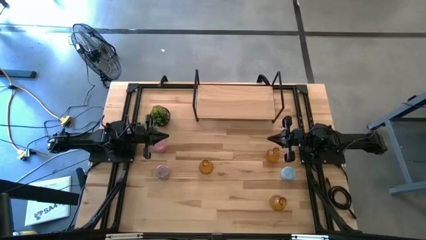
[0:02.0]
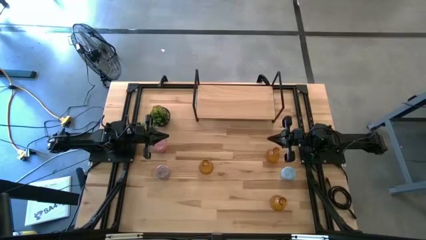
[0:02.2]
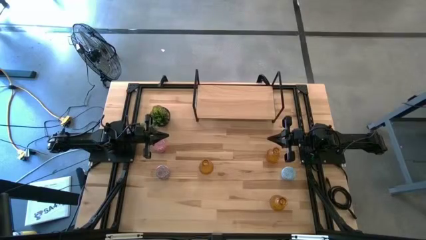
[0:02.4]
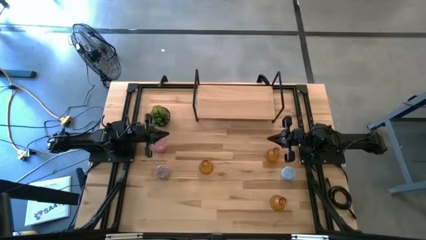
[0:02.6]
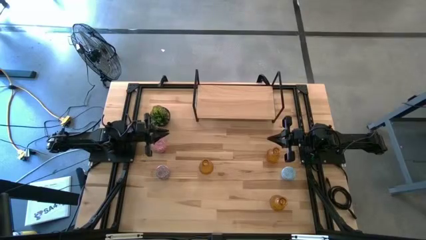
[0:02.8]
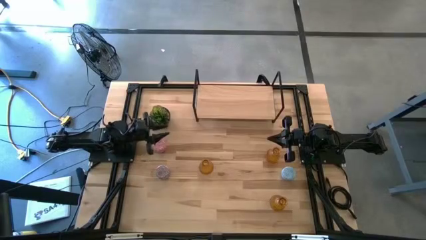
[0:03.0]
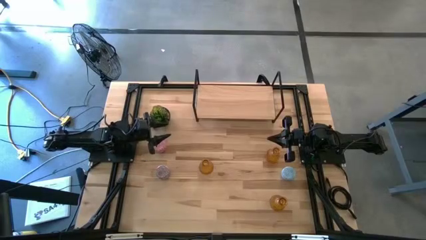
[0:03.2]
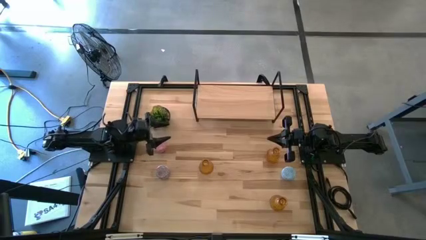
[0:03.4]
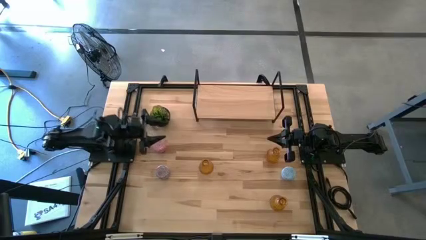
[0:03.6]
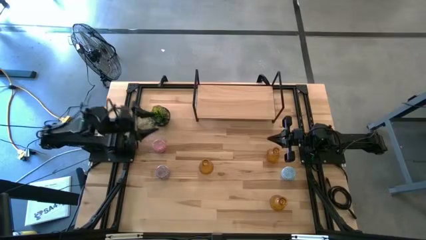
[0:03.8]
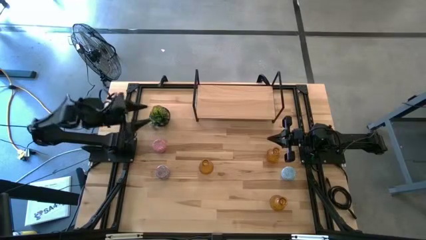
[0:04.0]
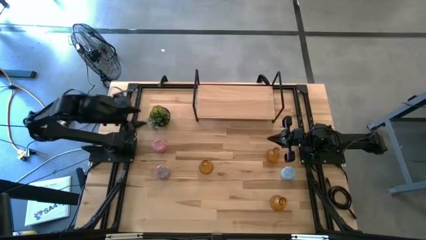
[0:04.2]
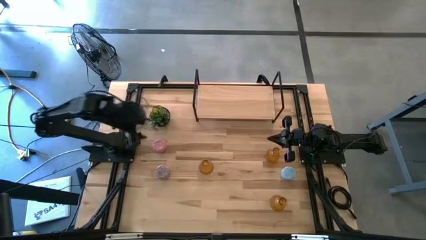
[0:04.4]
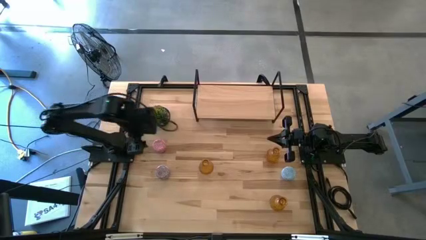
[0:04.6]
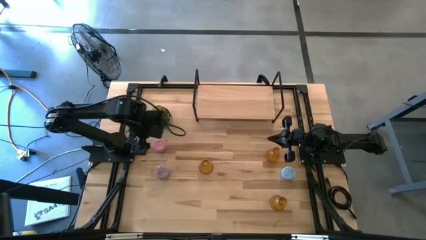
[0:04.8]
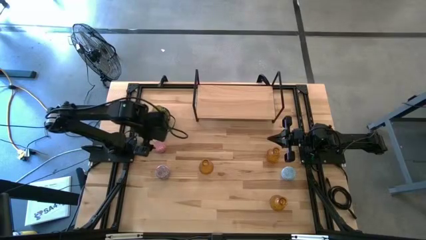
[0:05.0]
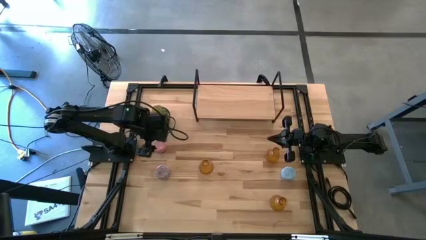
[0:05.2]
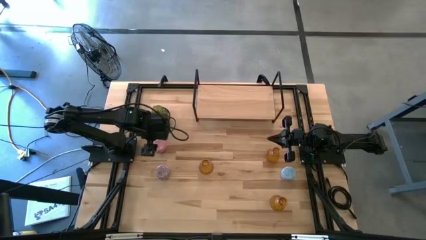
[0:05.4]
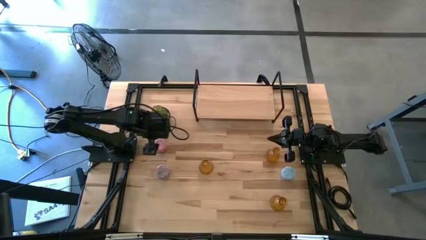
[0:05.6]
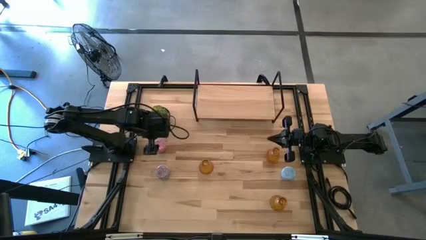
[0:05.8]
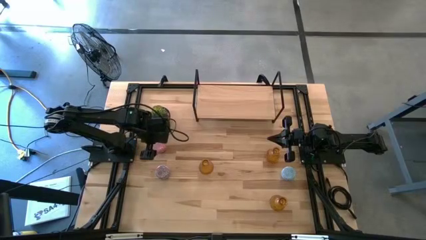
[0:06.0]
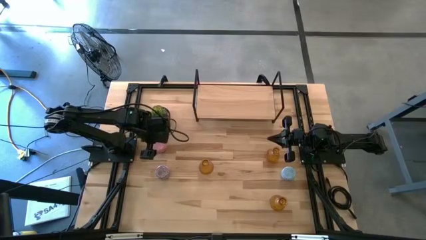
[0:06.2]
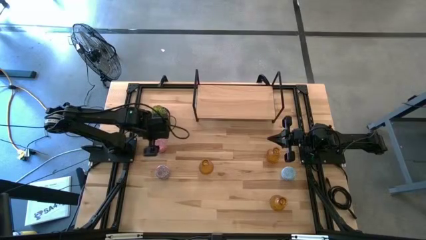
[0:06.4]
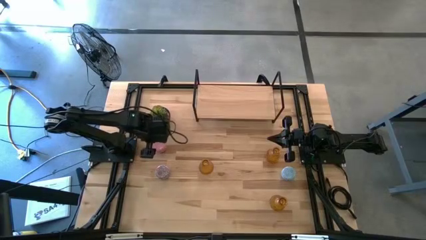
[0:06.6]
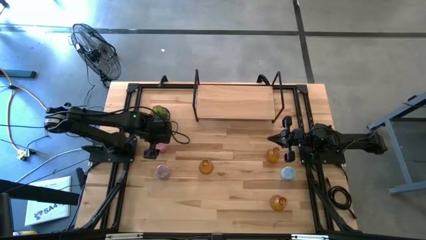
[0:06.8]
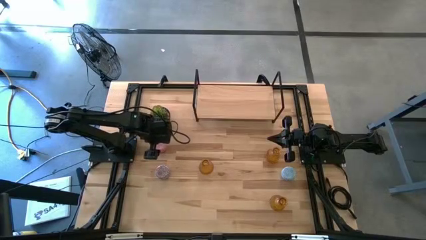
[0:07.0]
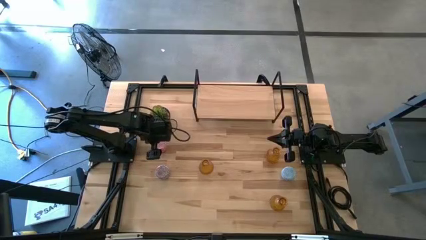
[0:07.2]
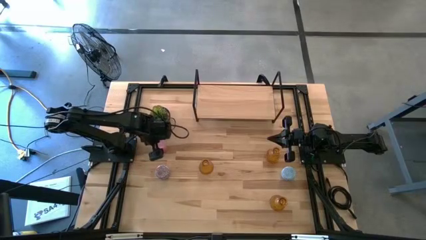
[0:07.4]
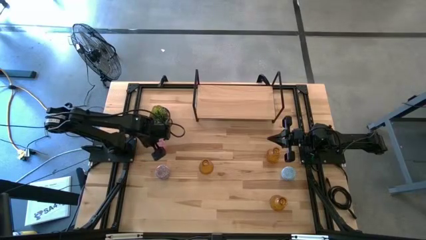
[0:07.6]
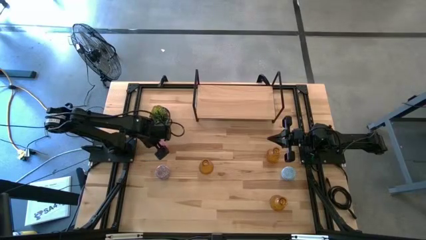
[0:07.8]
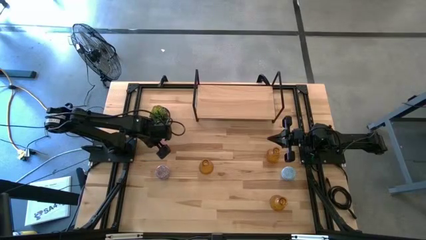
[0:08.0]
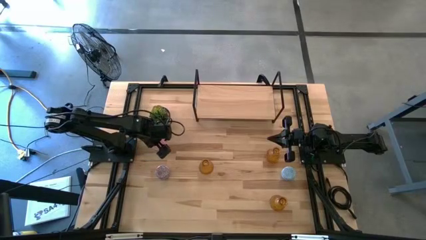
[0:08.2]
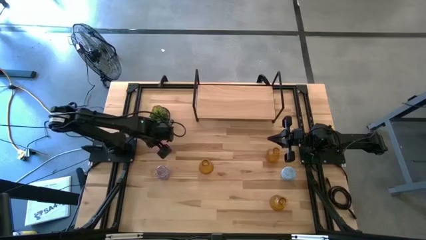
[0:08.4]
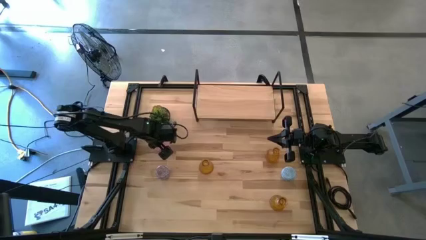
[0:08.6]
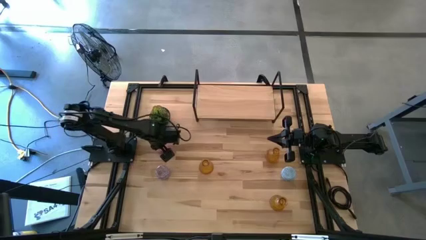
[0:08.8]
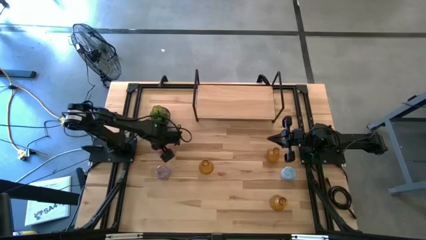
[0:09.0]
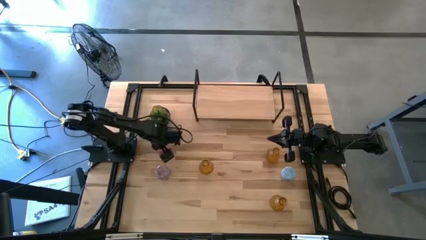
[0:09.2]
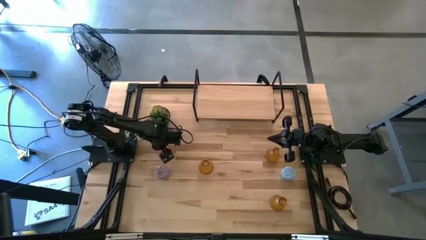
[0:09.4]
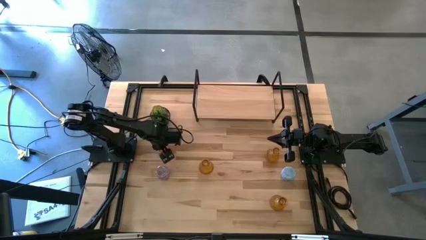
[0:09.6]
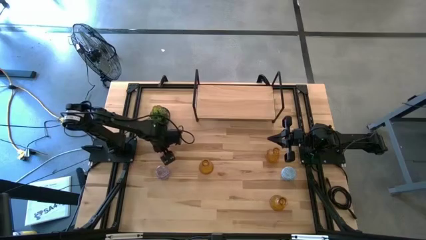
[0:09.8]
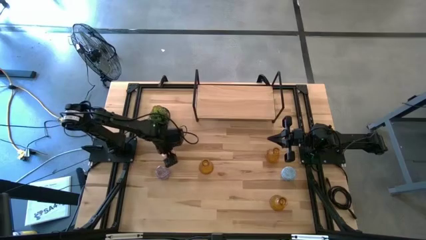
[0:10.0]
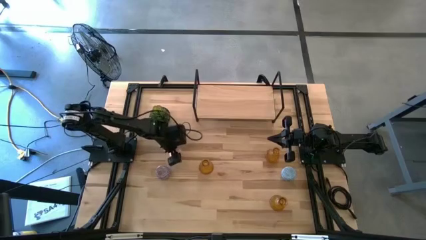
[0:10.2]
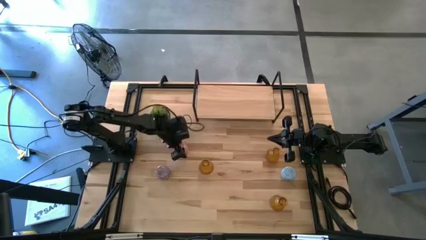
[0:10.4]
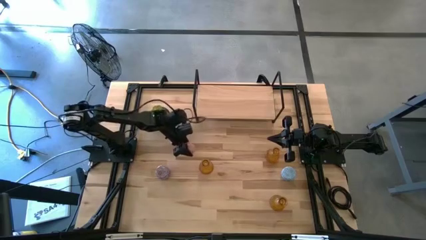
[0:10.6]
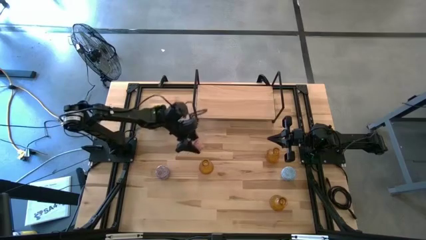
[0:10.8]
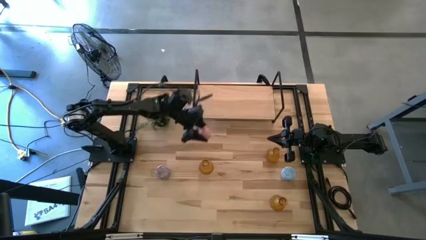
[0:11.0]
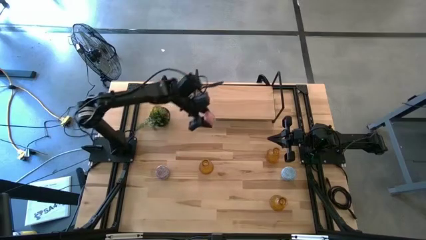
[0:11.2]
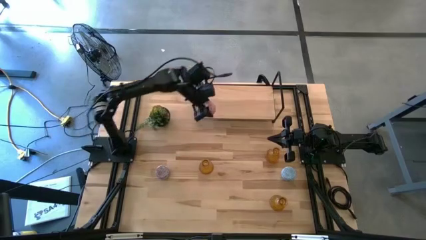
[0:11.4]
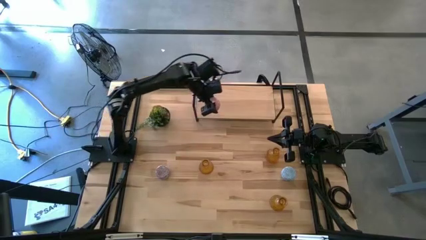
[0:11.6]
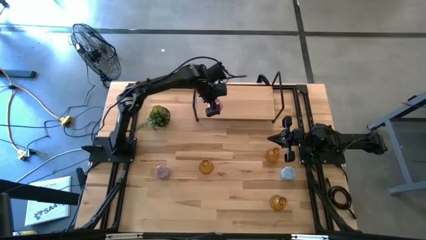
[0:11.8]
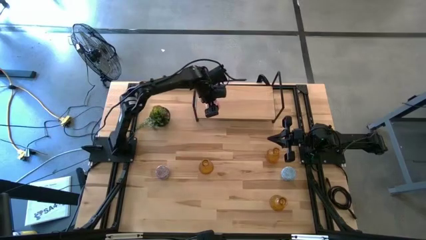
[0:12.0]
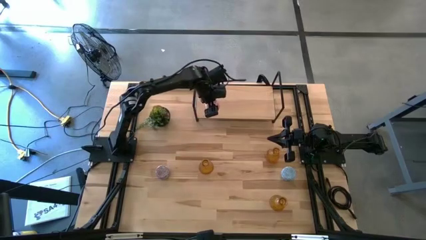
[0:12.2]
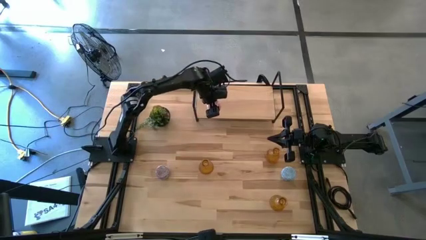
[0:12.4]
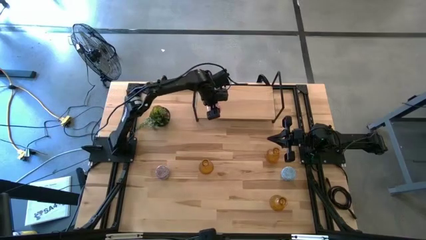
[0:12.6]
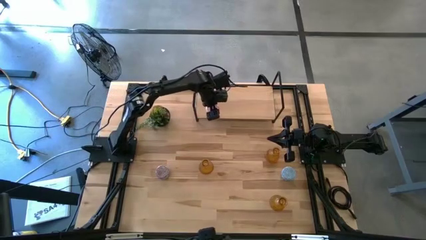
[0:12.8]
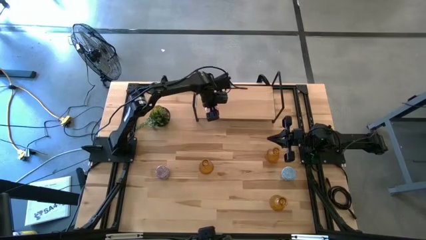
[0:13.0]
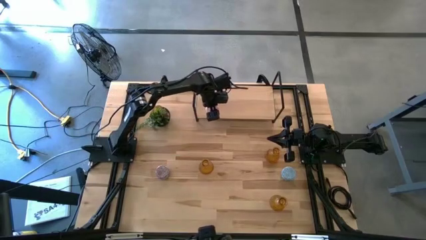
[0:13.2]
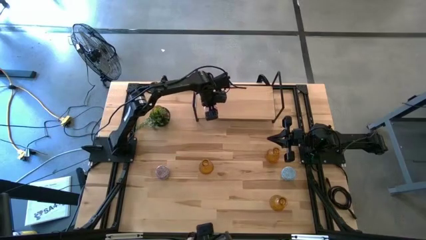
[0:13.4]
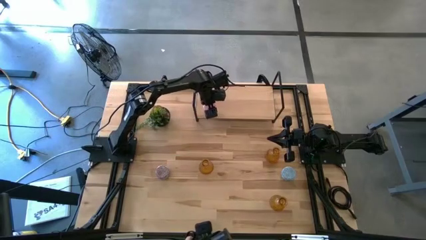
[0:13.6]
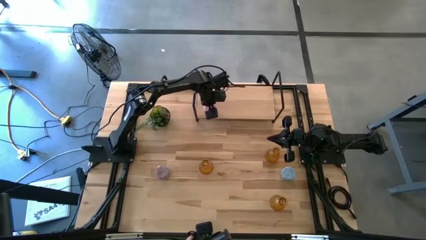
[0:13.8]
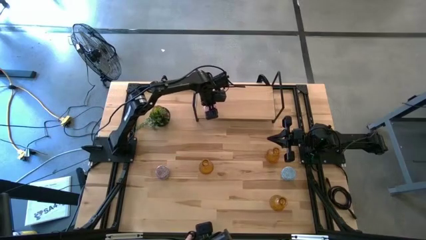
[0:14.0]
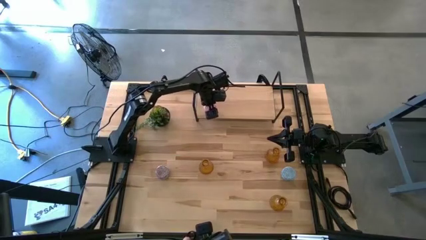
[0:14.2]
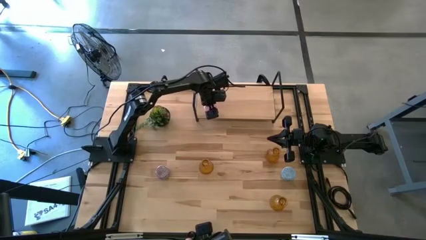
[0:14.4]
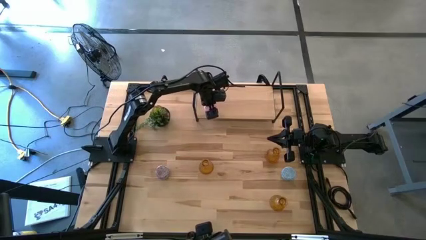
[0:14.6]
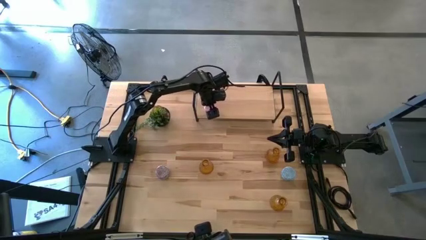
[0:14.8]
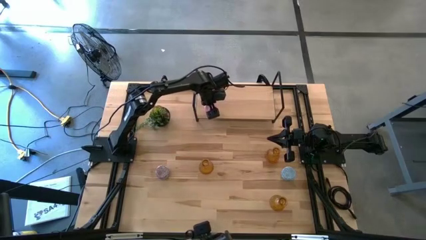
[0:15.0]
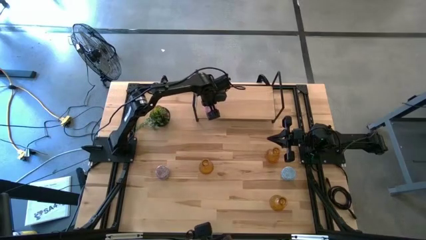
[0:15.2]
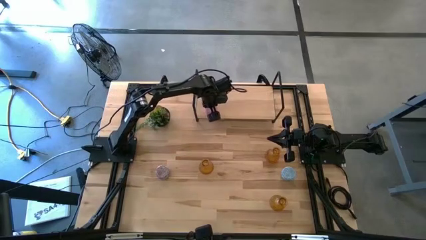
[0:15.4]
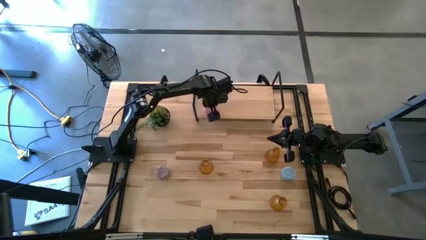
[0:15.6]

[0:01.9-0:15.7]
Task: Pick & Place candle stick holders
Put the pink patterned scented candle on the shelf

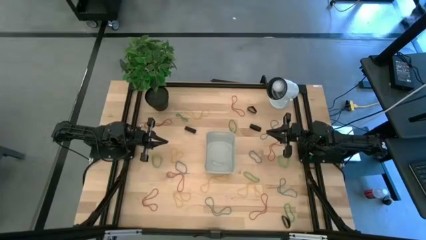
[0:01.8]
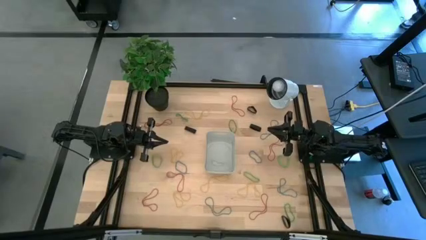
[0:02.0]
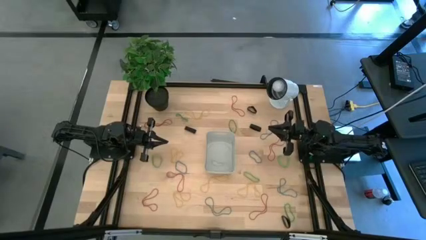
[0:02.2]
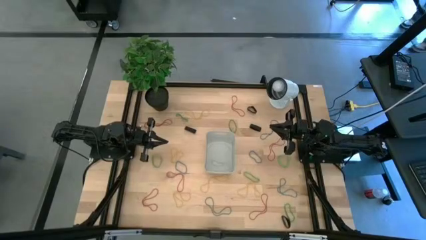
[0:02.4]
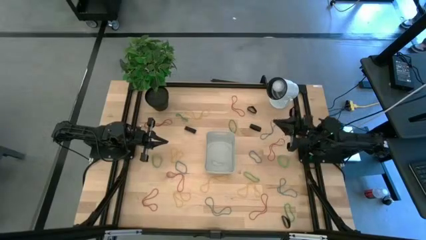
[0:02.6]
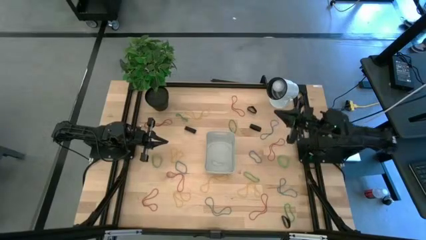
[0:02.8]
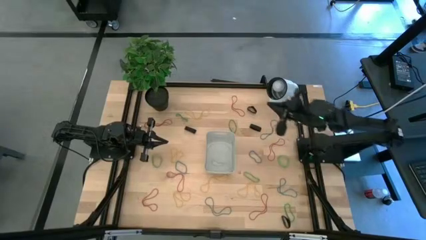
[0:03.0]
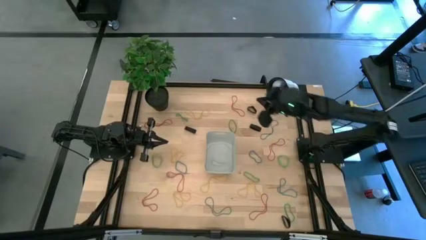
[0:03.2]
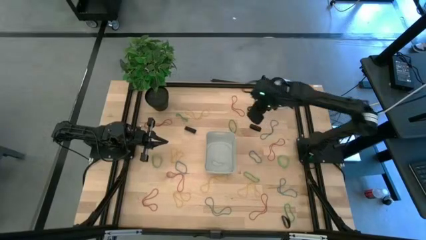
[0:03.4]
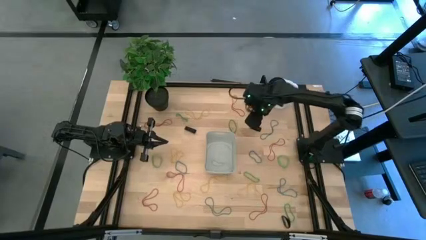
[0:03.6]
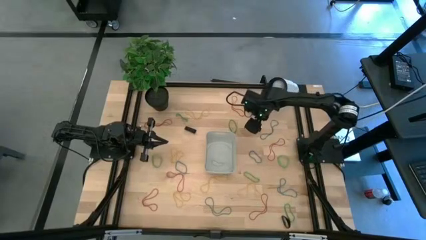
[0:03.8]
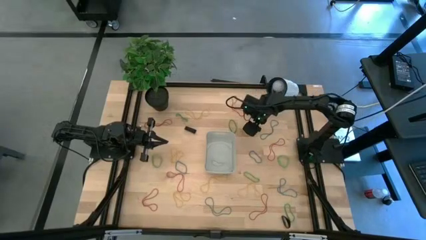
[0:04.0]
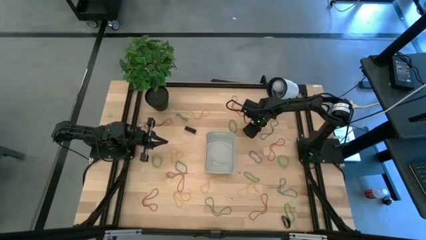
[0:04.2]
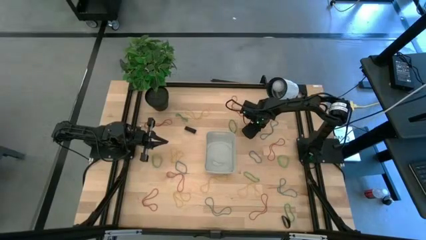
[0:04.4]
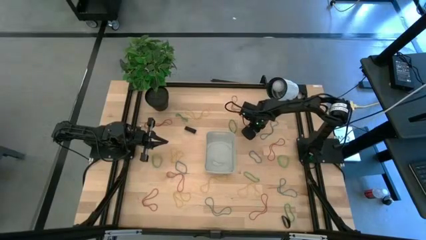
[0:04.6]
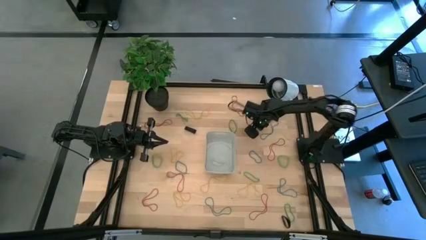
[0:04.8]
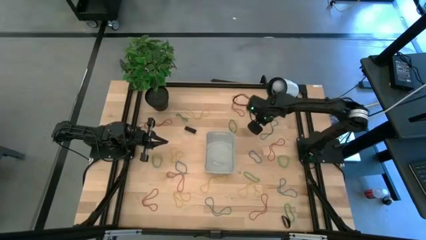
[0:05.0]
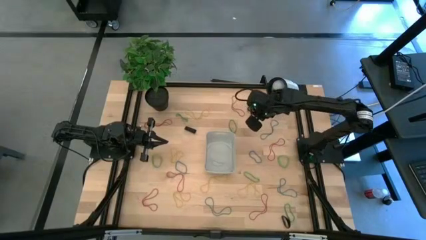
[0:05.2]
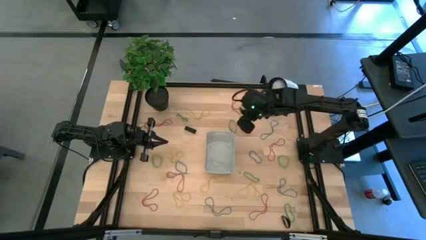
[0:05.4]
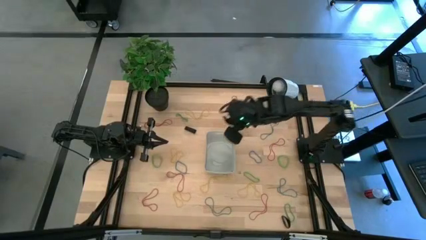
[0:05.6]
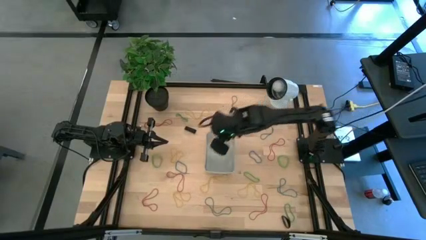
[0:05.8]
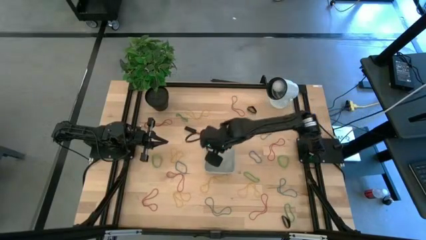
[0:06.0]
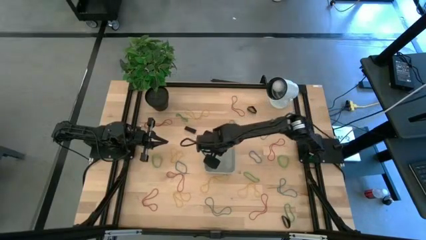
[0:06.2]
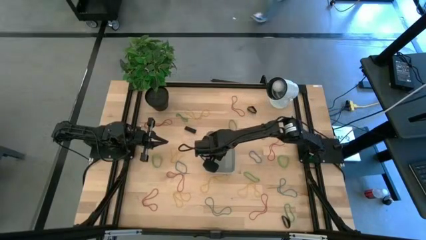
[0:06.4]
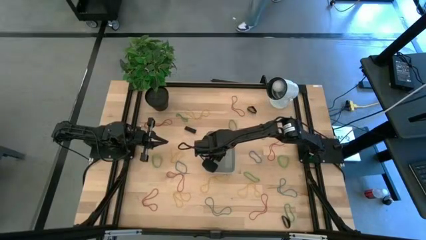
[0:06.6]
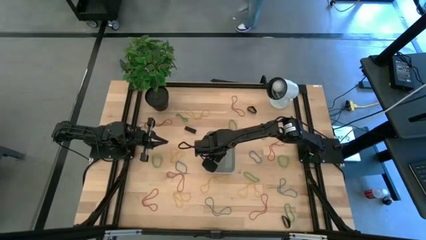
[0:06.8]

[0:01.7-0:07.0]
Task: Pick and place rubber bands into bin
Put the black rubber band into the gray bin
